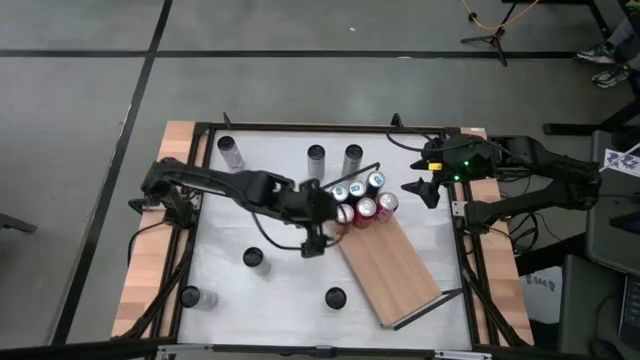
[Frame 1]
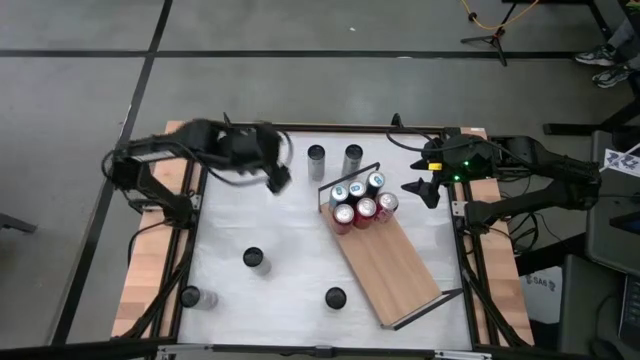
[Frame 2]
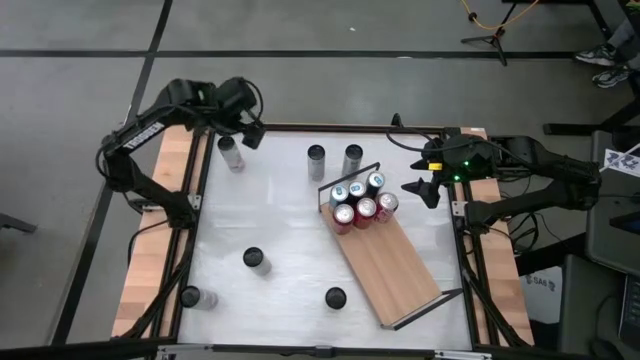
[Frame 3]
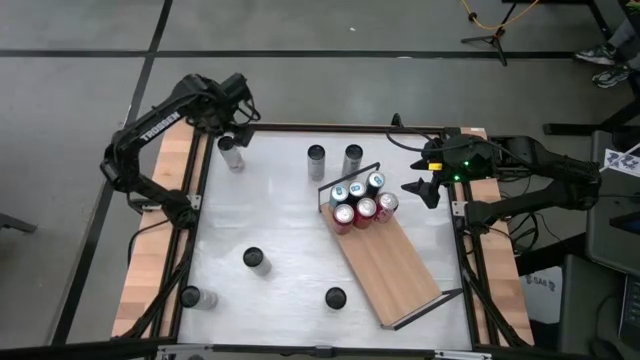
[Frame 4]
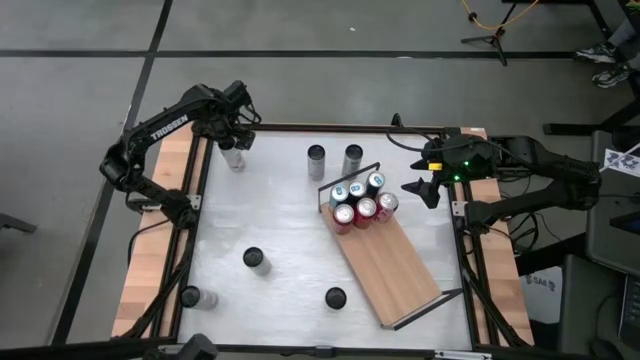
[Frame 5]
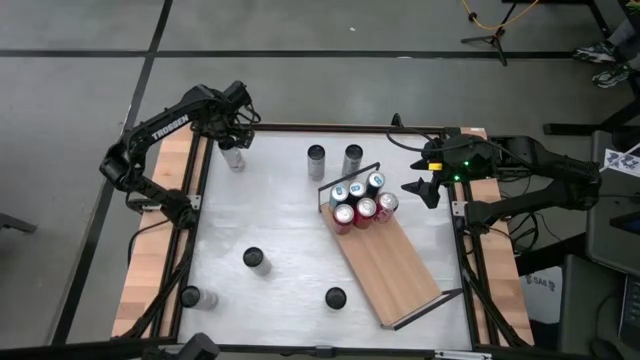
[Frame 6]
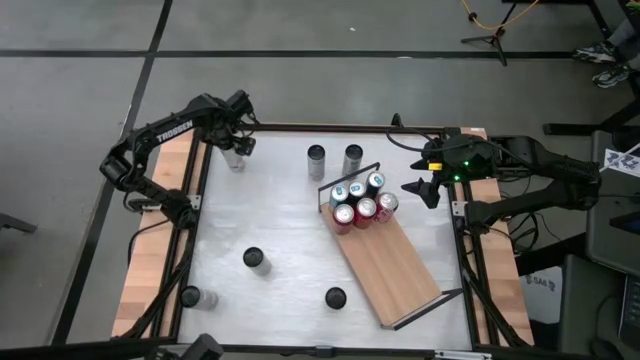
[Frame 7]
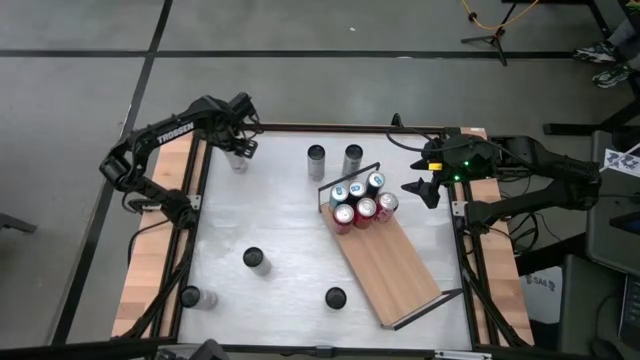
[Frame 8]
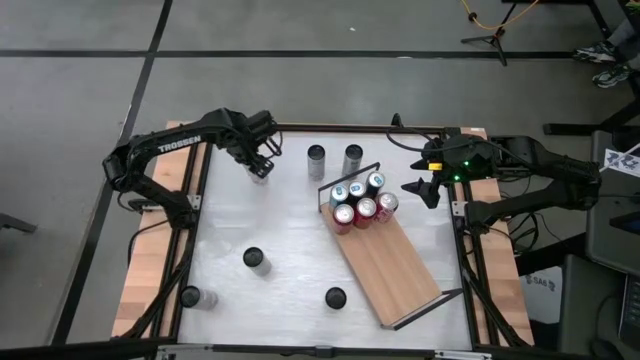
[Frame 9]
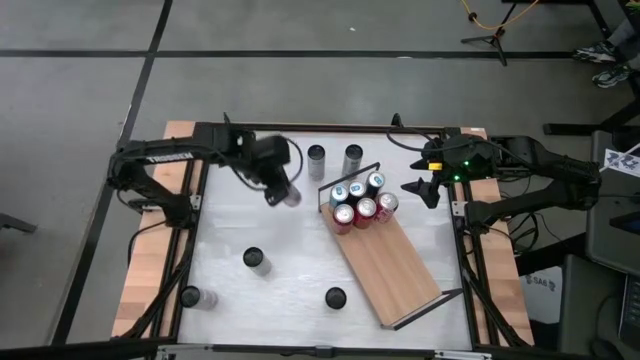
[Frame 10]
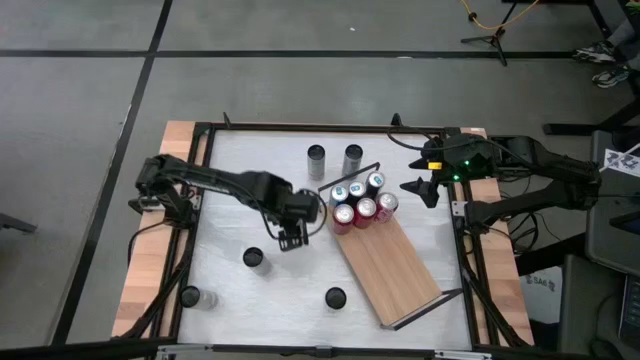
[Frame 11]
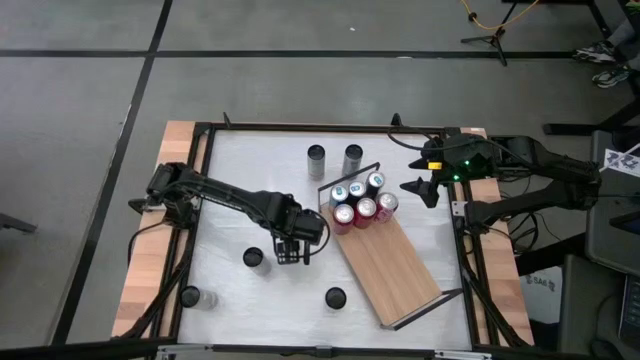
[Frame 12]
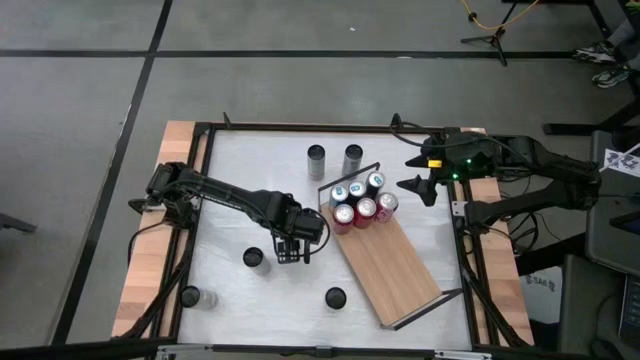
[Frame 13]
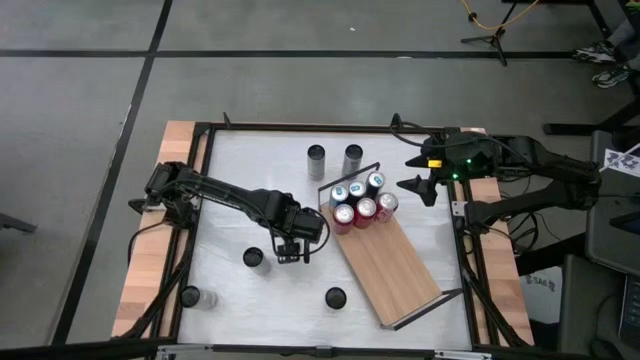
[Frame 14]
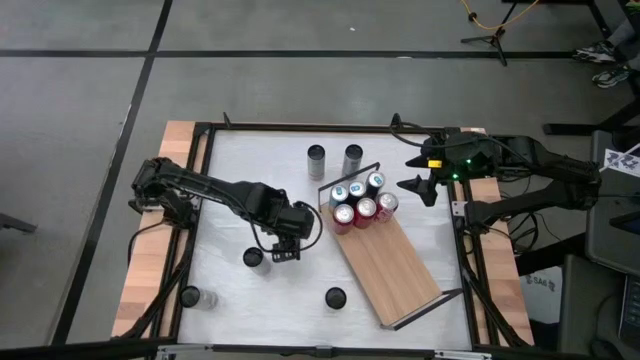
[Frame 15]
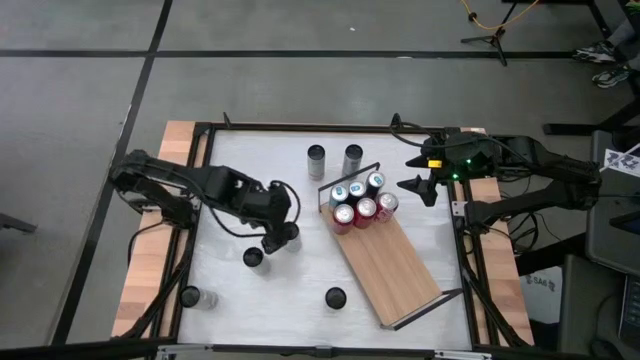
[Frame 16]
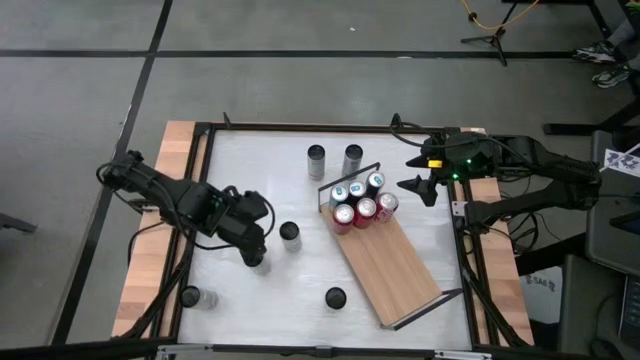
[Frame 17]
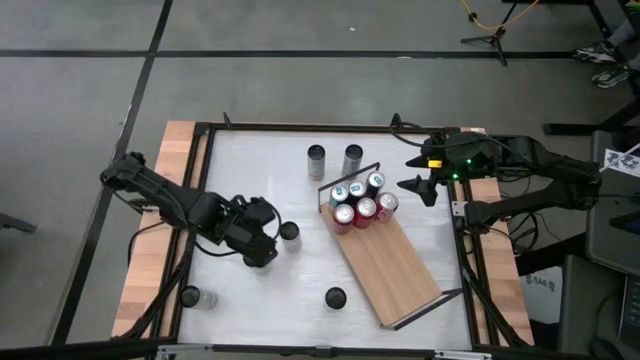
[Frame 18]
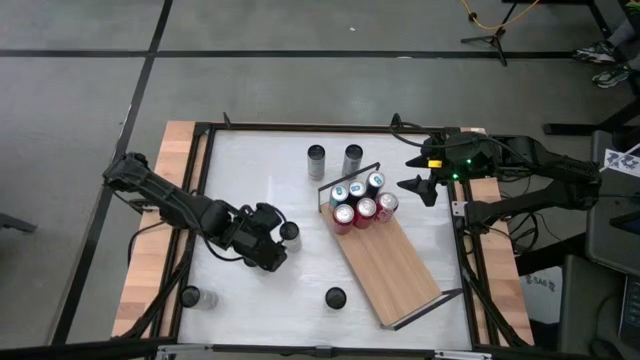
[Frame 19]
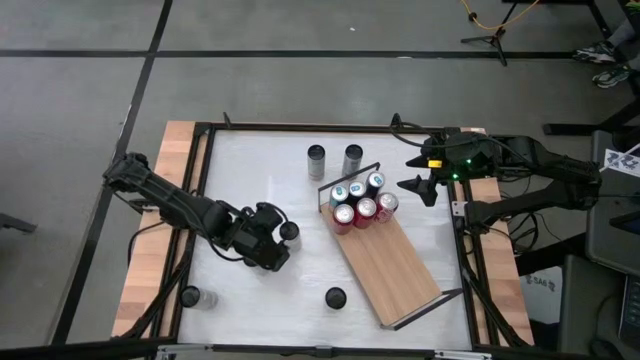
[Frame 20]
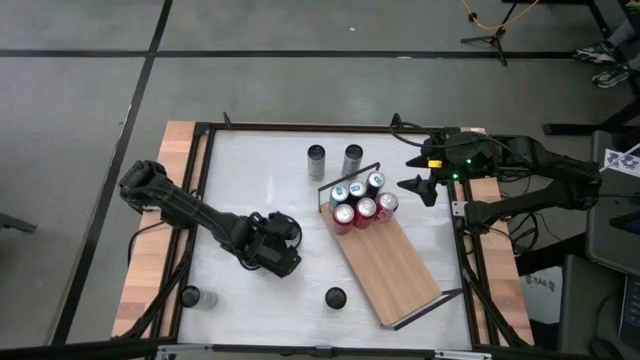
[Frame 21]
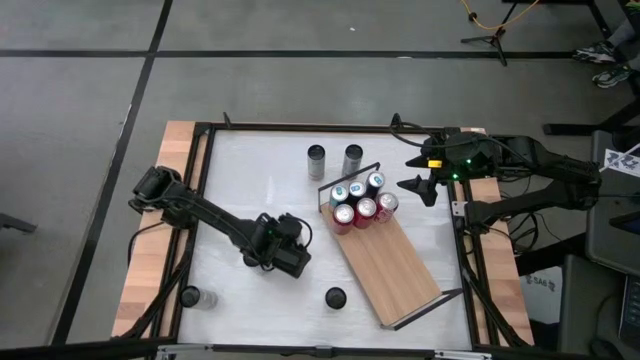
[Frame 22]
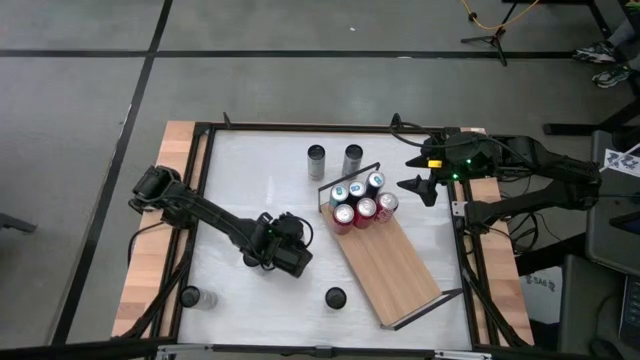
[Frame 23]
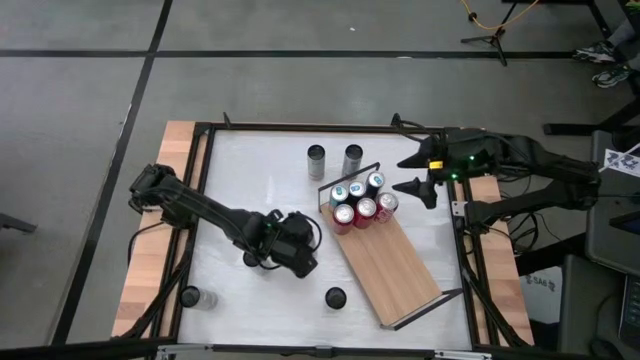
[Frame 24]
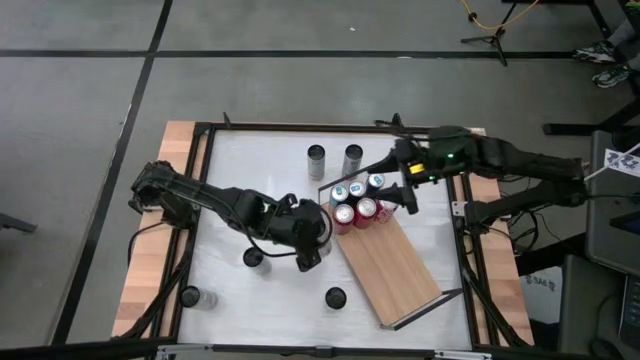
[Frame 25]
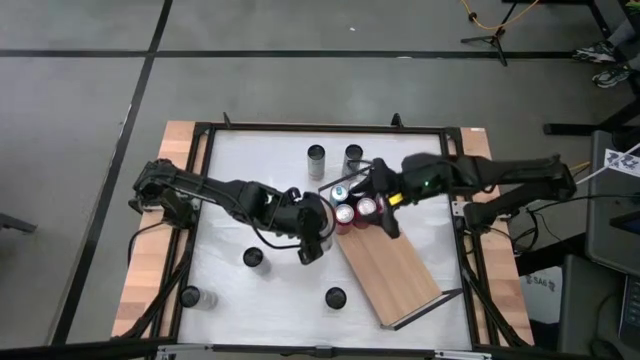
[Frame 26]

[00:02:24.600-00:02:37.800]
Task: Place canned beverage on shelf
Put the white pink soda can on the shelf

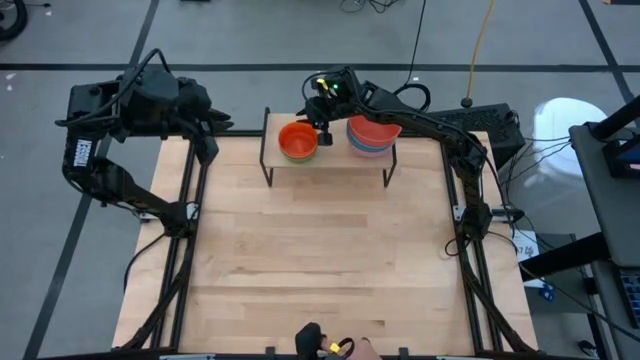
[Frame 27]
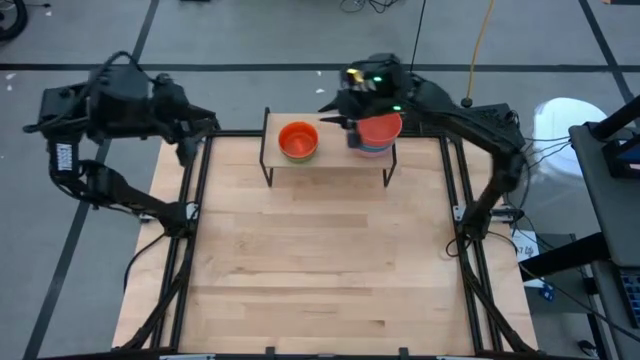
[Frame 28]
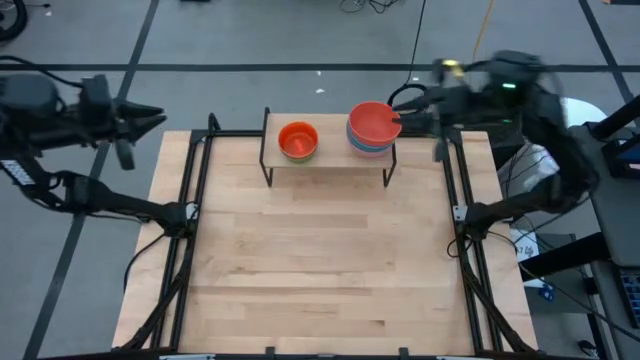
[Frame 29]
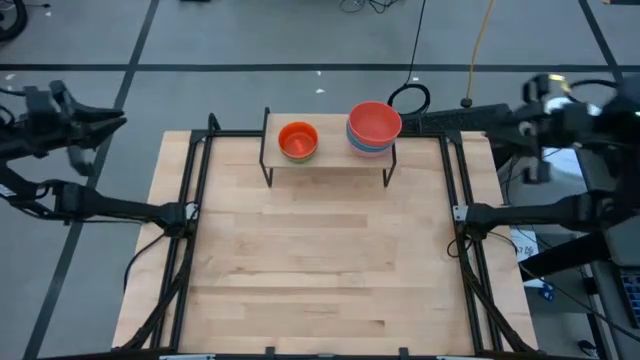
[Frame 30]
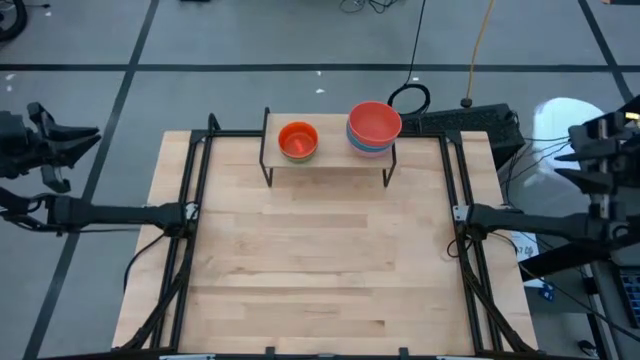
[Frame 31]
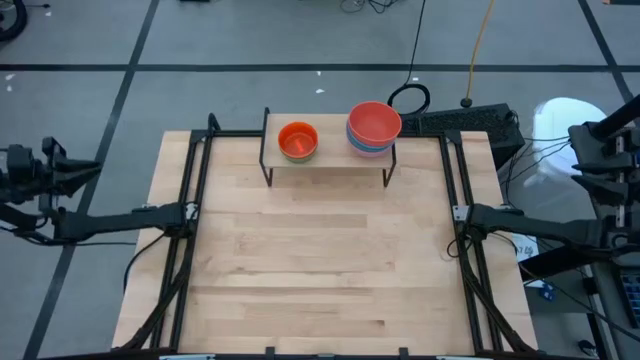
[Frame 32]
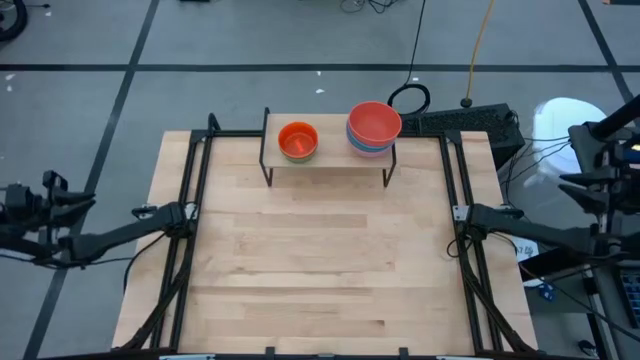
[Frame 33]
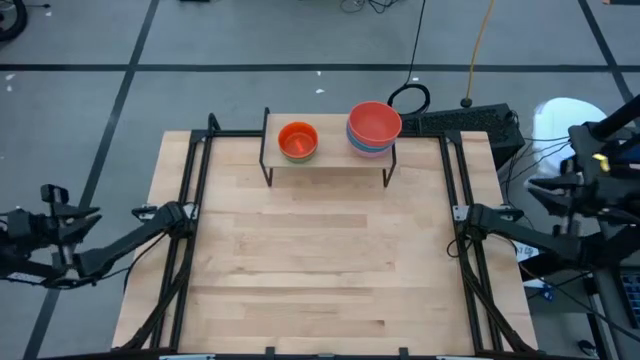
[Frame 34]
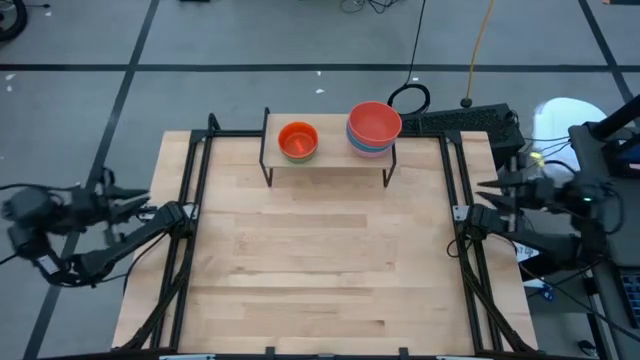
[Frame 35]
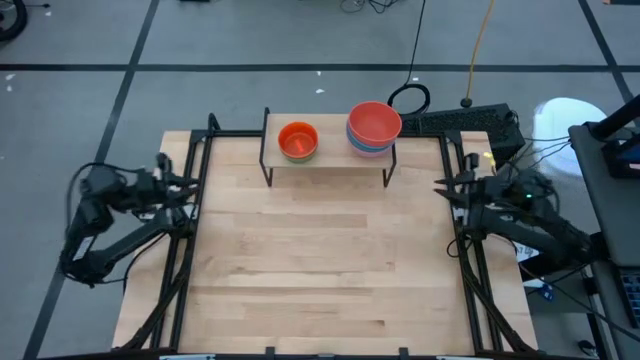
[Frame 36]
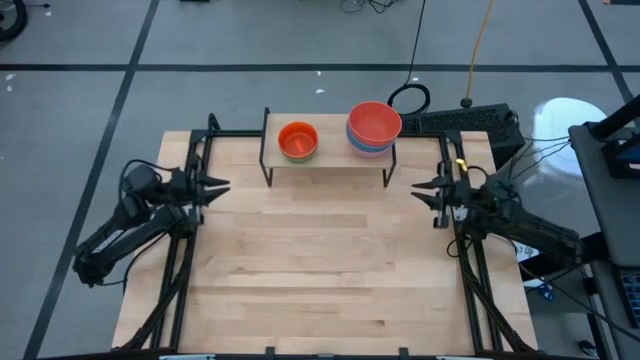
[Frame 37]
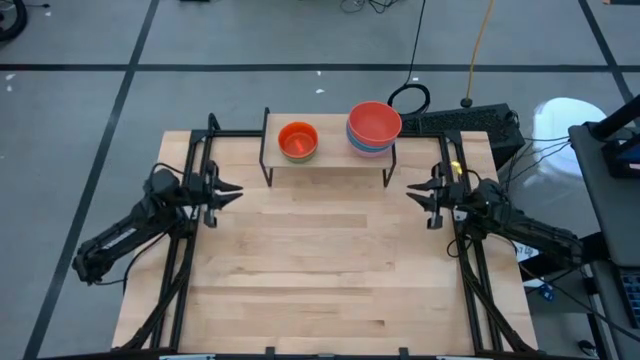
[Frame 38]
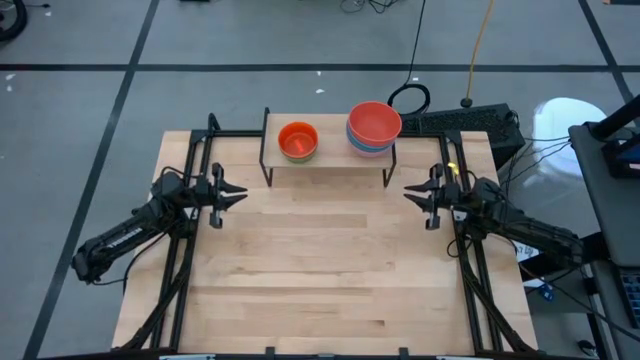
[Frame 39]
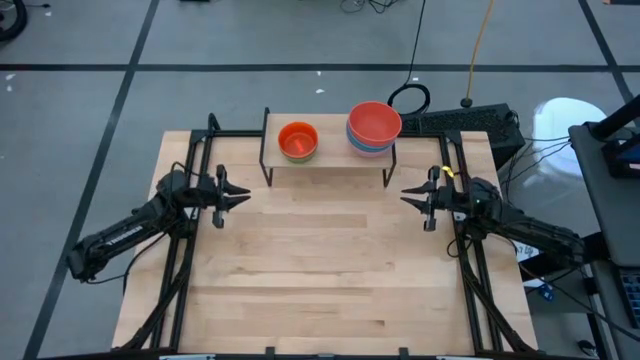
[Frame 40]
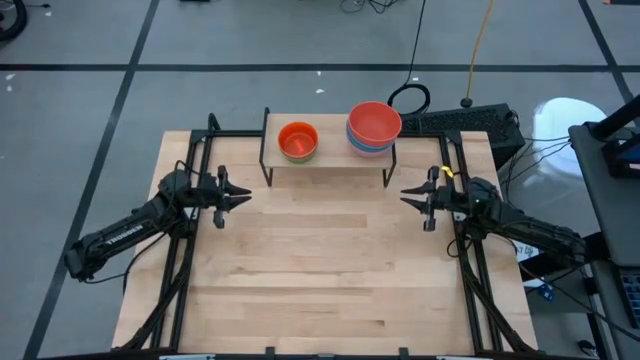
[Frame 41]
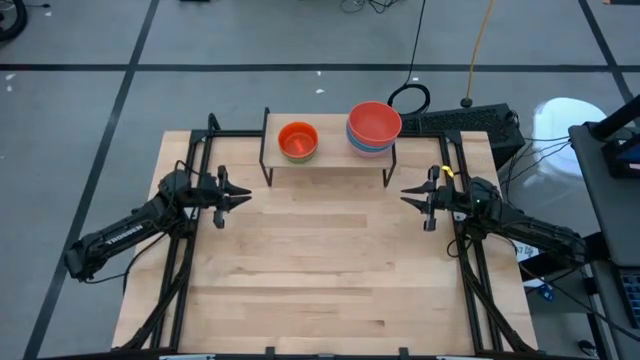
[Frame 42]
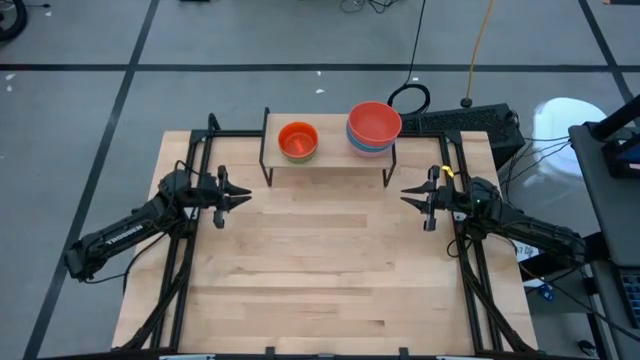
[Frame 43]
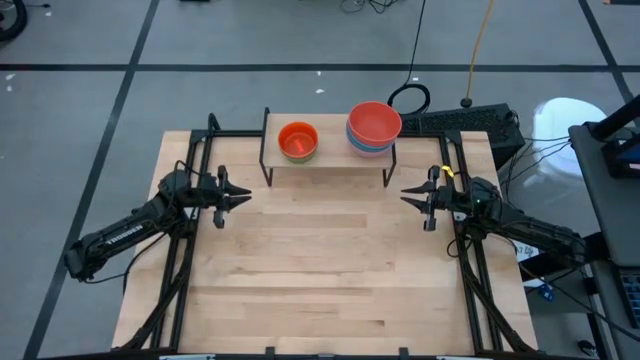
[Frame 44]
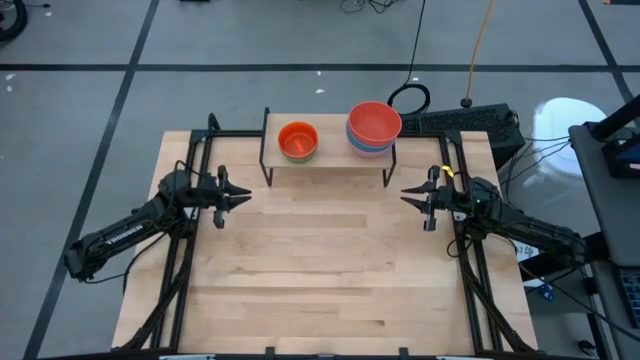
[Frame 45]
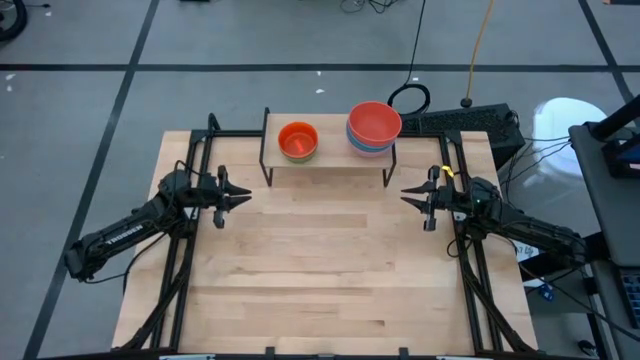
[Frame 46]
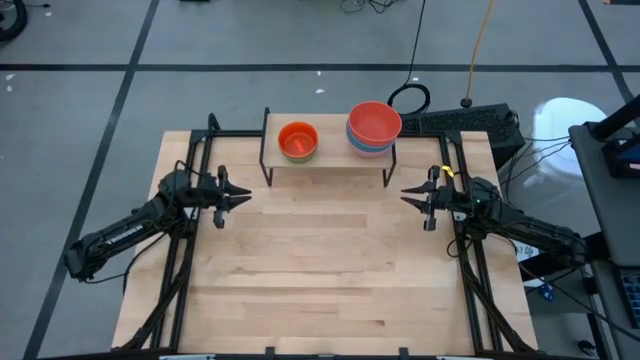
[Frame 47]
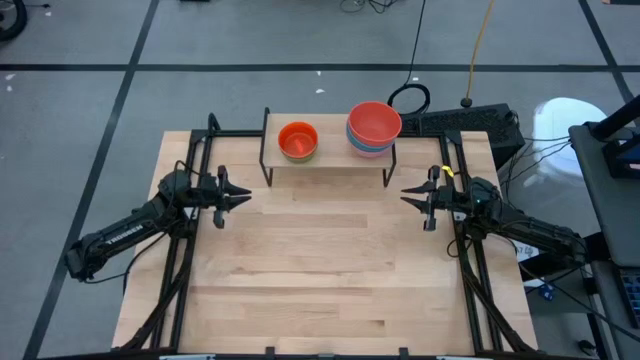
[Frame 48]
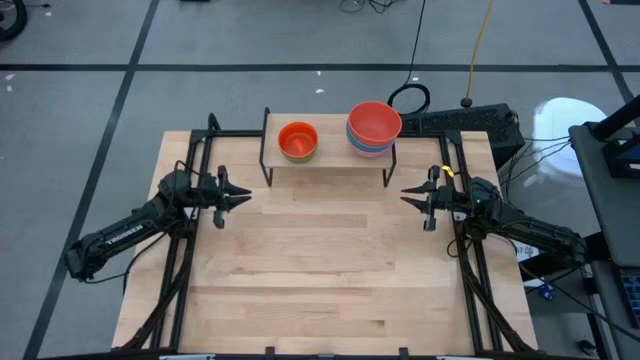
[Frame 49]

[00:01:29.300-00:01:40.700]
Task: Place and stack bowls onto a shelf
Return to Home Position
